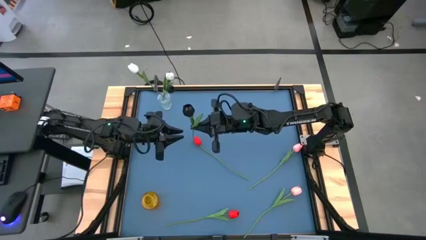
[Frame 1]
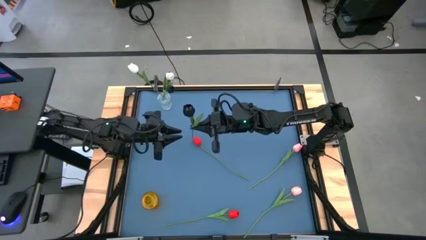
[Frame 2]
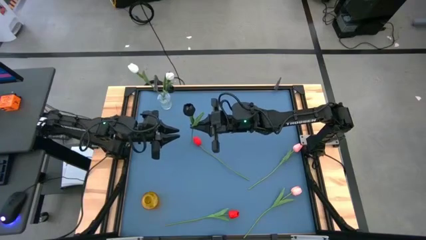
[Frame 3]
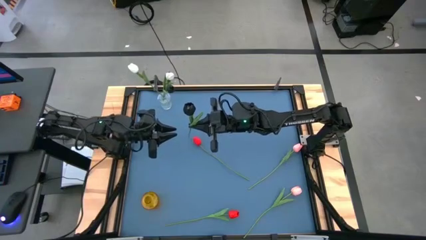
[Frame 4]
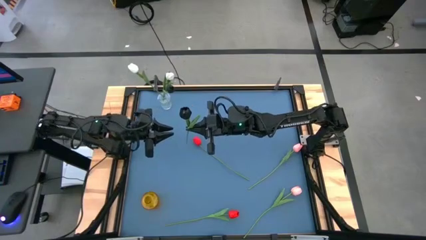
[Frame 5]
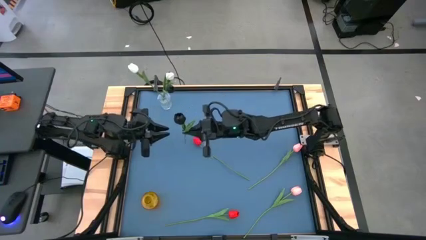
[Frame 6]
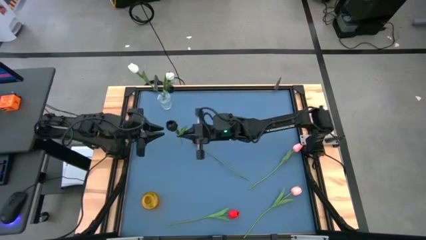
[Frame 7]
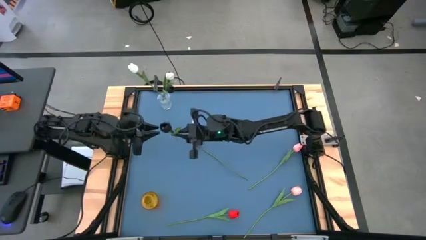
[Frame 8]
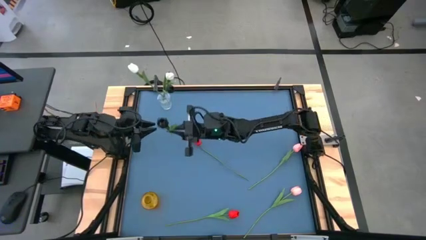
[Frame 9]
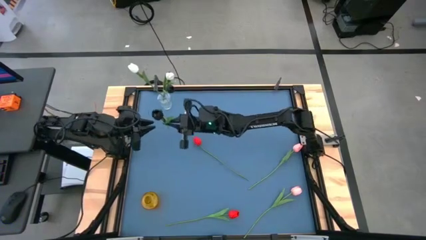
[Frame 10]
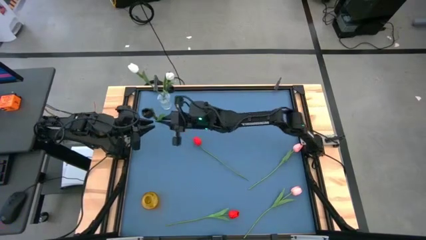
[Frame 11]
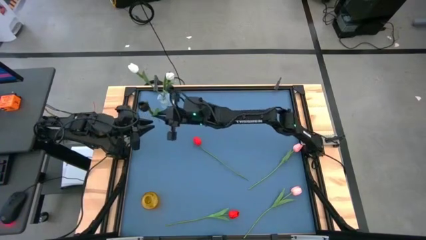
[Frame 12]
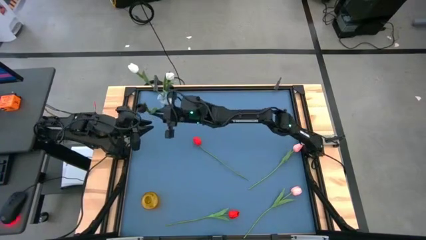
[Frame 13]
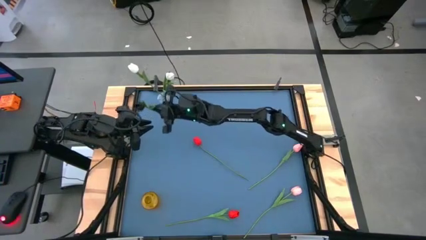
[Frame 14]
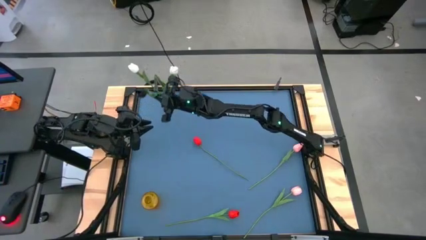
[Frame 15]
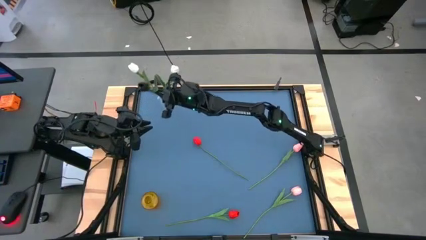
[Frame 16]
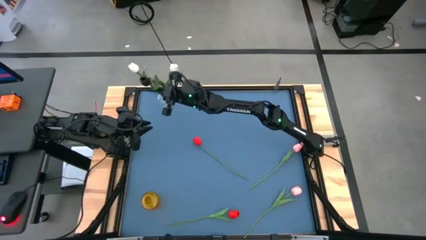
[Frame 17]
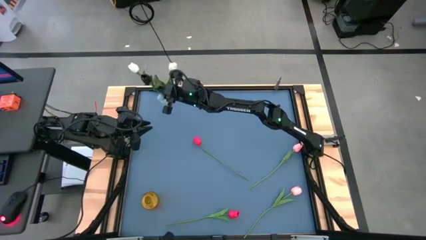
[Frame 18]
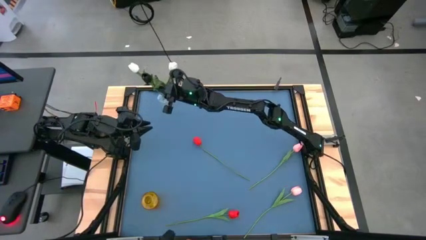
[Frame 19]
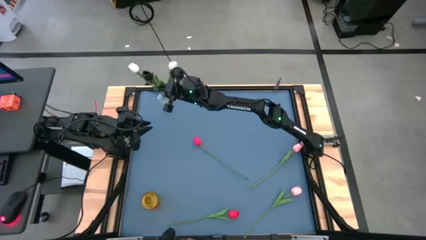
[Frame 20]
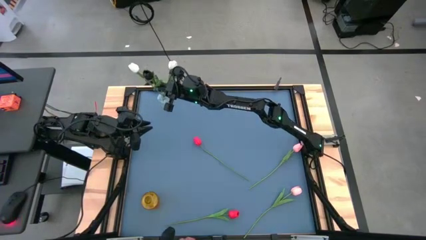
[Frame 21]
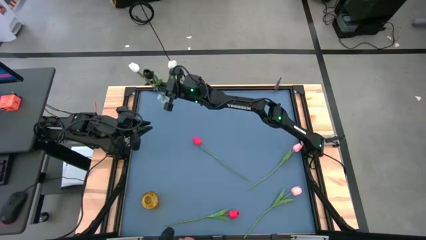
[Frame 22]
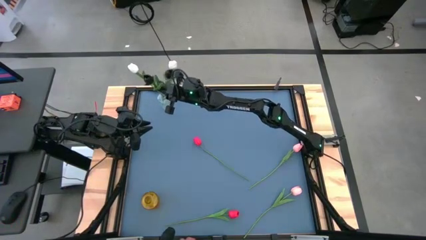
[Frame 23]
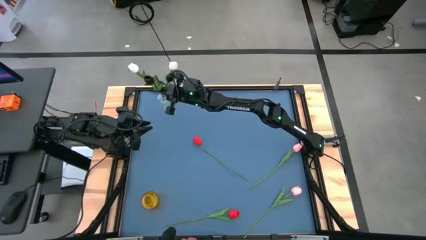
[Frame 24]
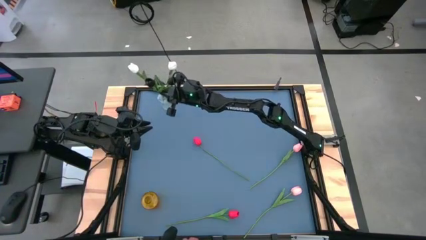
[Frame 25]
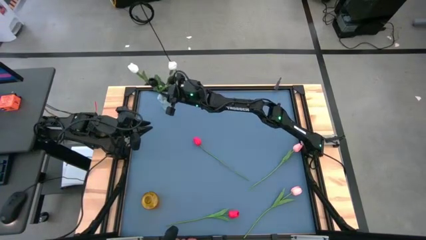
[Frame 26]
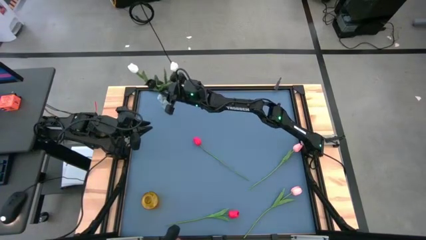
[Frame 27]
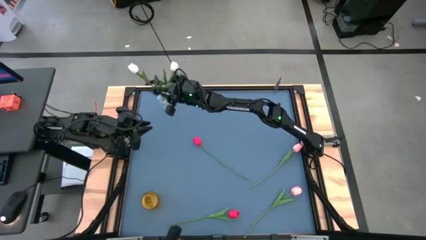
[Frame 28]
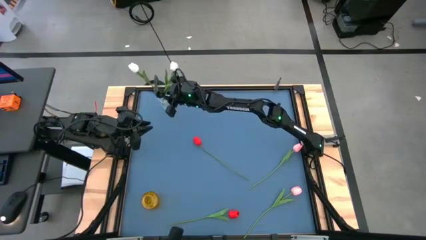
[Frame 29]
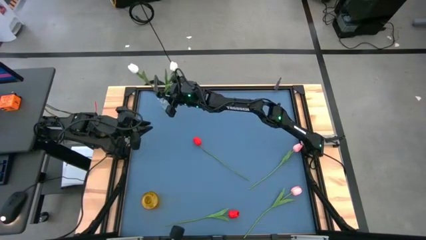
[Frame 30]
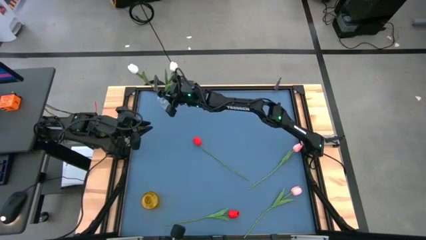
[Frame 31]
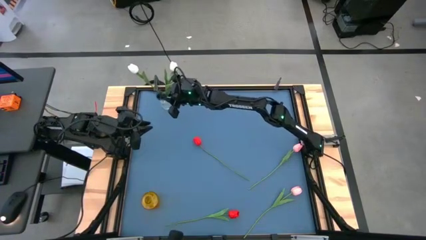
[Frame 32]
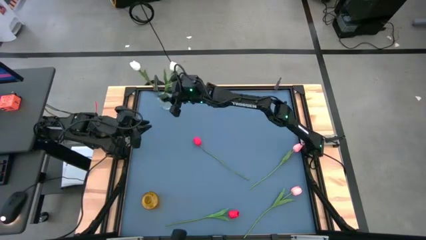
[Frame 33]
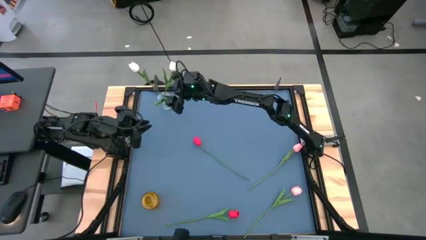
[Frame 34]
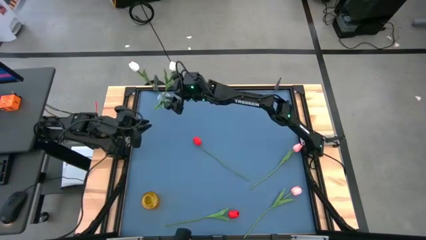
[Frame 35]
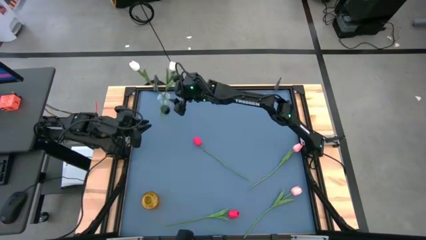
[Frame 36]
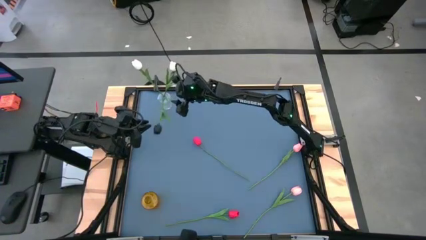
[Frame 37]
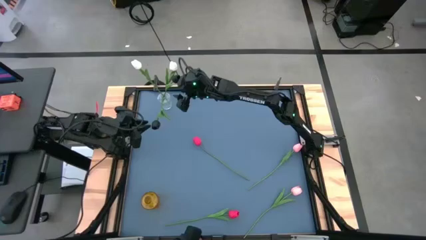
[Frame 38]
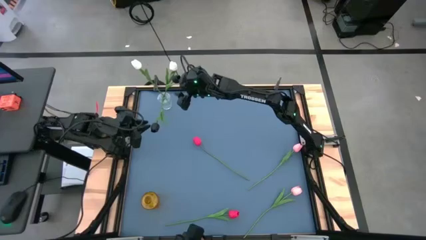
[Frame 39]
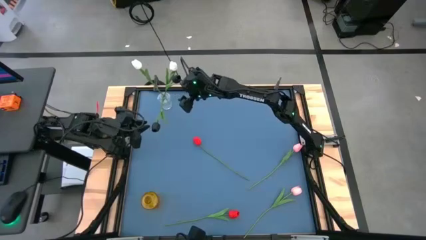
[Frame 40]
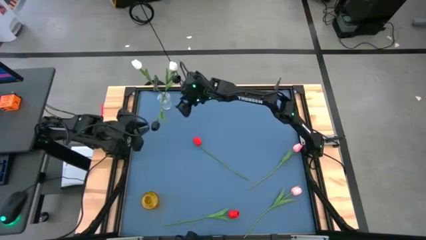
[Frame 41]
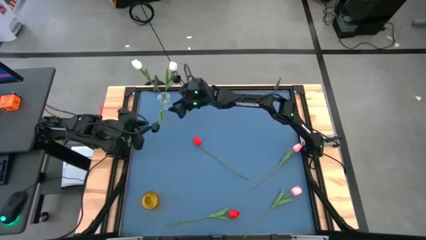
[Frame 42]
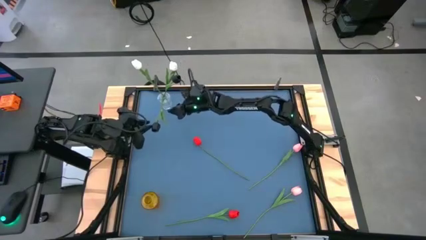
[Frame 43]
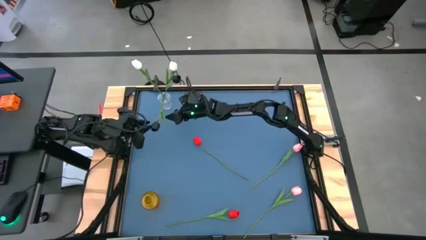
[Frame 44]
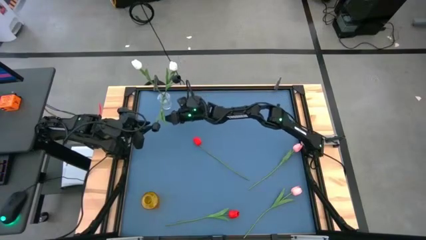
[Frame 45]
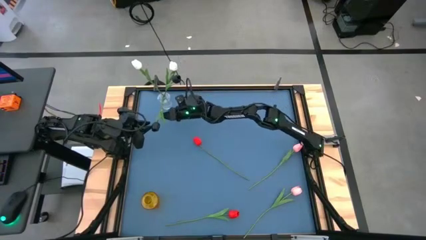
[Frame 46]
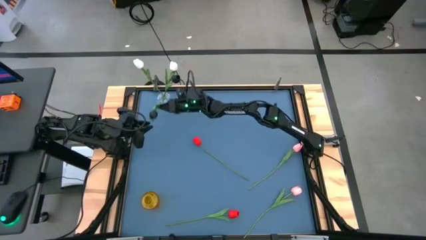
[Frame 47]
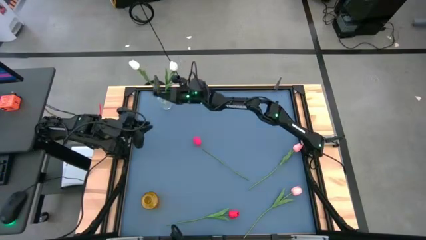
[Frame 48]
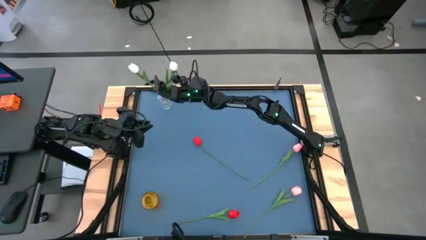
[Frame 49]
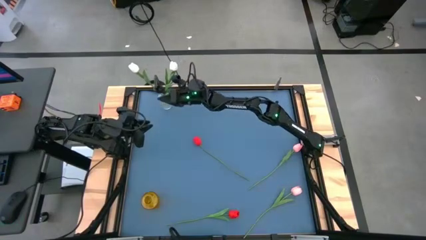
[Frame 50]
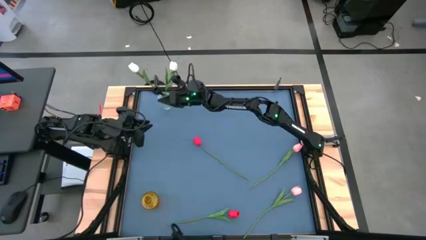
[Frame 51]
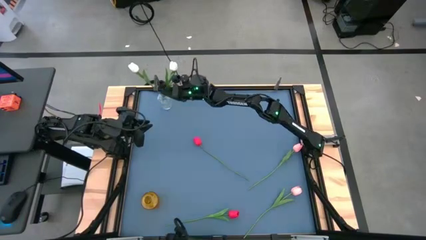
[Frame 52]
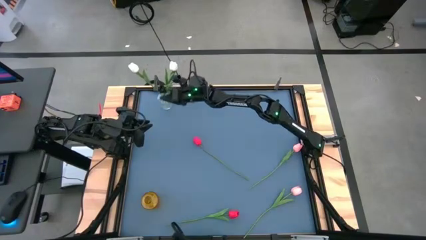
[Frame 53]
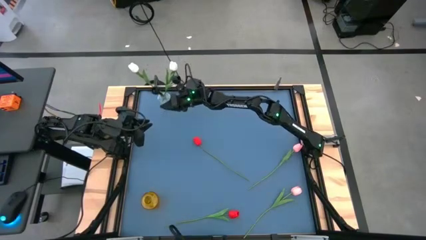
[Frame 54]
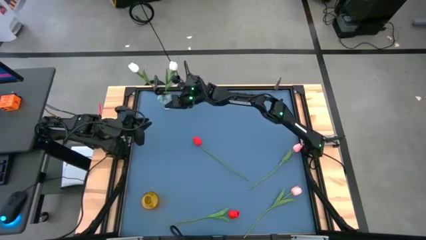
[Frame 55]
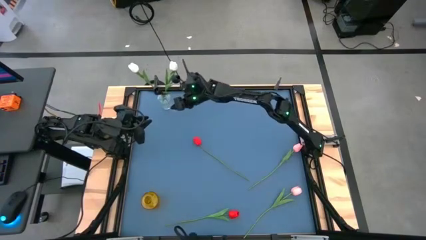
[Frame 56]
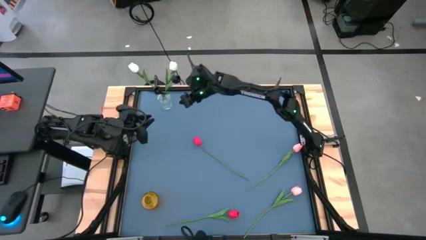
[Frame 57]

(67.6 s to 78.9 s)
Task: Sort flowers into vase by color
Put the black tulip into the transparent flower vase

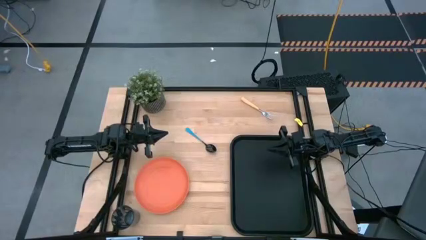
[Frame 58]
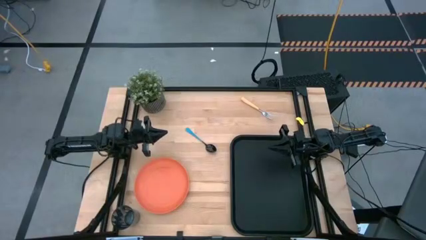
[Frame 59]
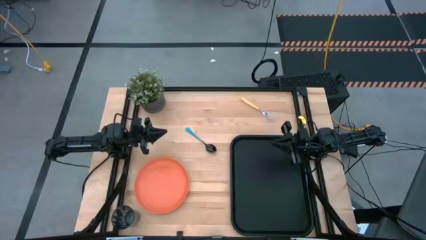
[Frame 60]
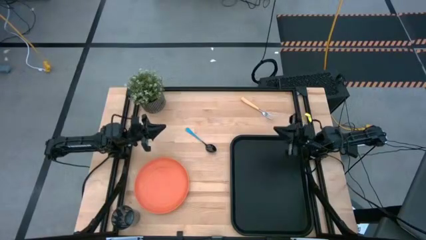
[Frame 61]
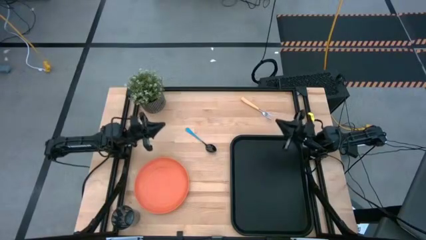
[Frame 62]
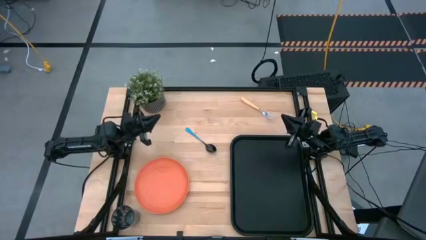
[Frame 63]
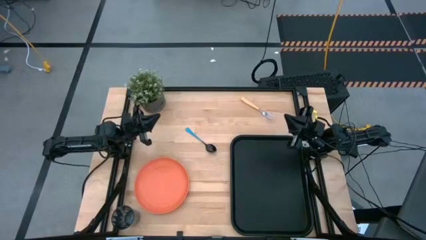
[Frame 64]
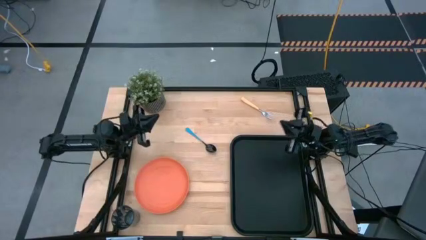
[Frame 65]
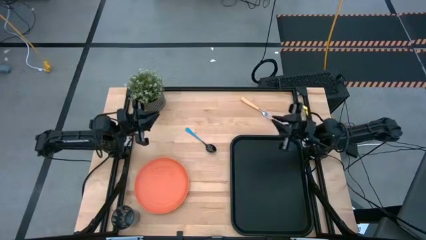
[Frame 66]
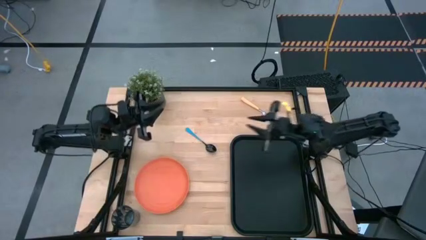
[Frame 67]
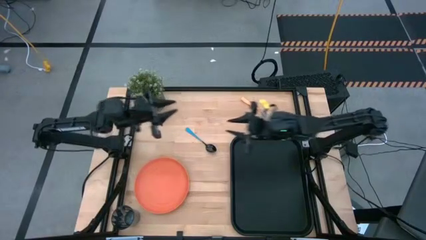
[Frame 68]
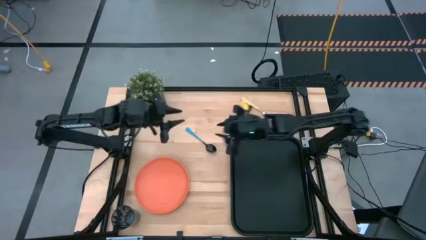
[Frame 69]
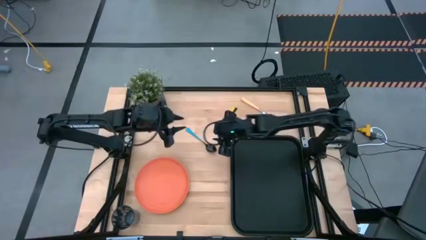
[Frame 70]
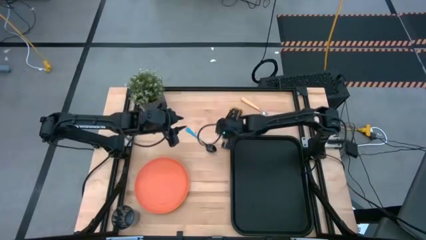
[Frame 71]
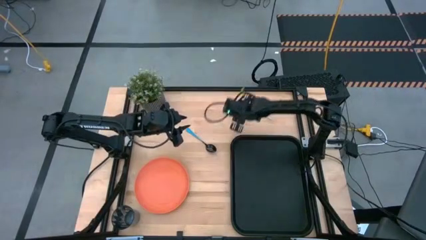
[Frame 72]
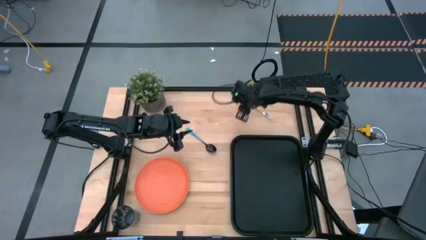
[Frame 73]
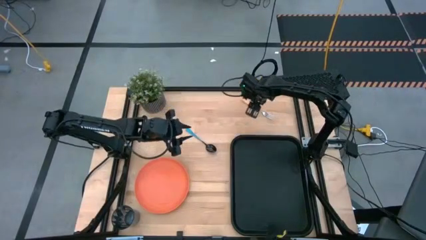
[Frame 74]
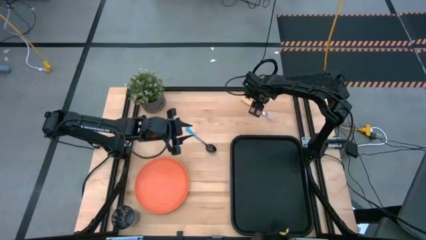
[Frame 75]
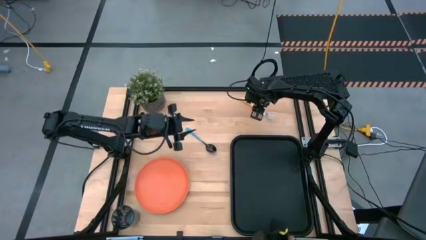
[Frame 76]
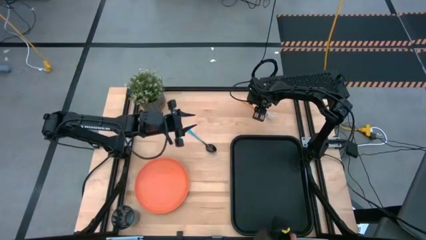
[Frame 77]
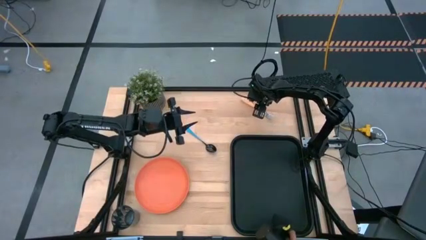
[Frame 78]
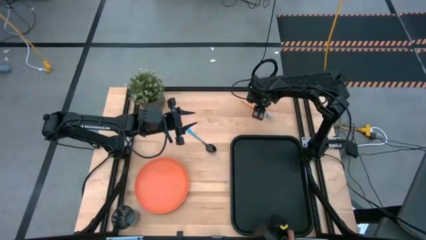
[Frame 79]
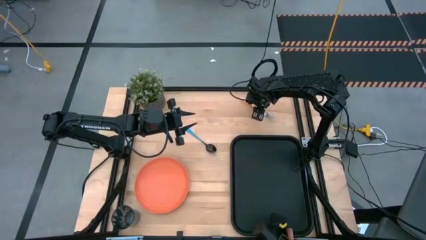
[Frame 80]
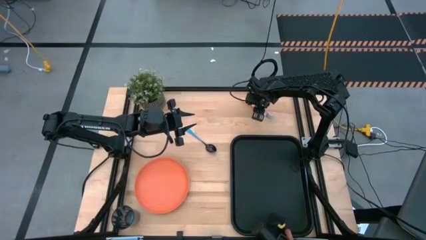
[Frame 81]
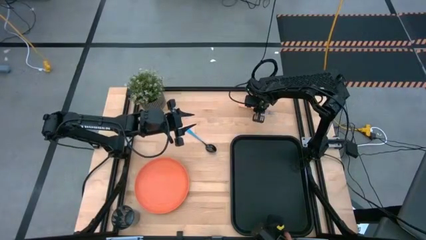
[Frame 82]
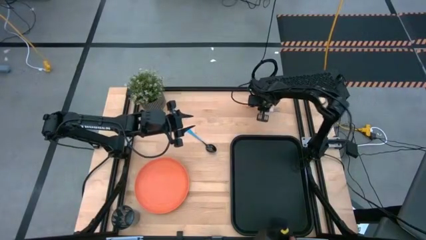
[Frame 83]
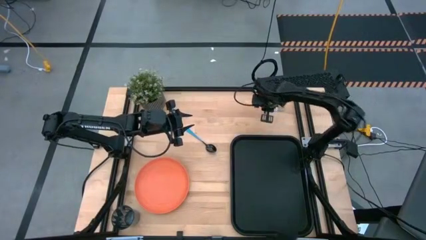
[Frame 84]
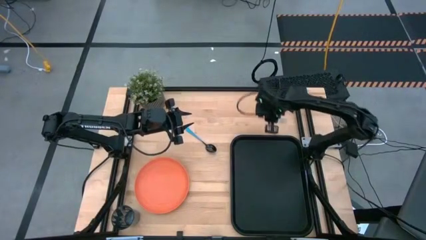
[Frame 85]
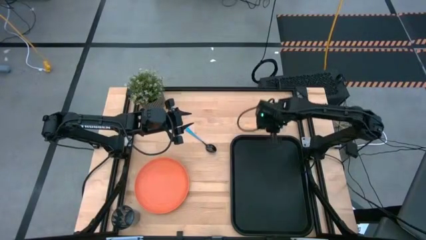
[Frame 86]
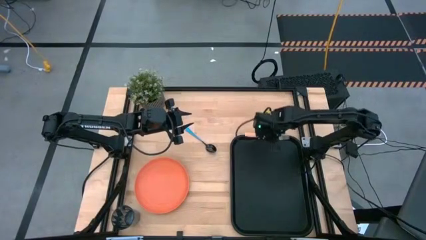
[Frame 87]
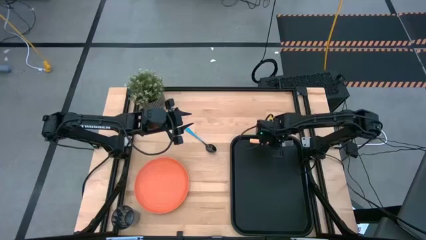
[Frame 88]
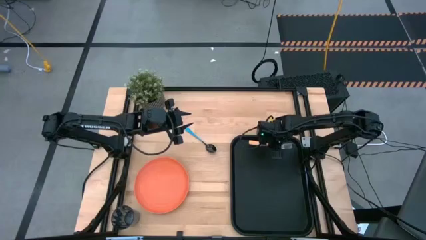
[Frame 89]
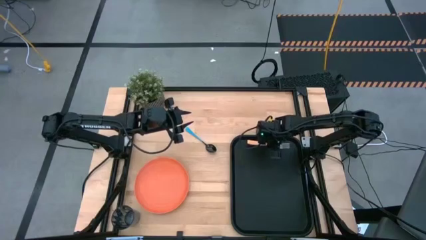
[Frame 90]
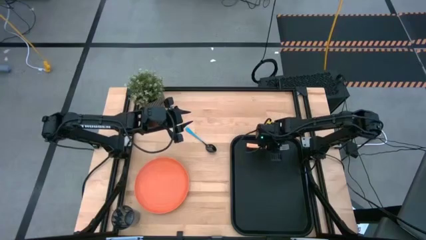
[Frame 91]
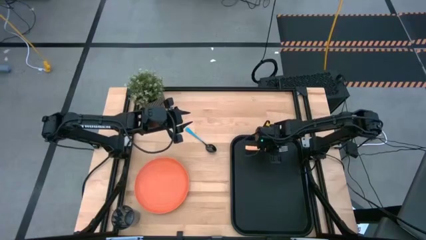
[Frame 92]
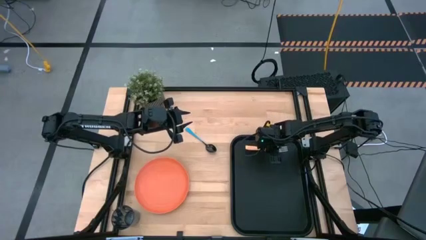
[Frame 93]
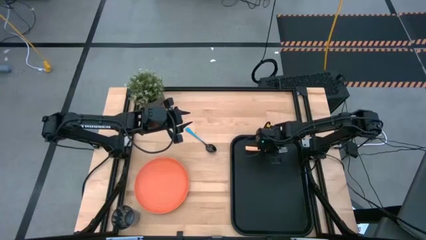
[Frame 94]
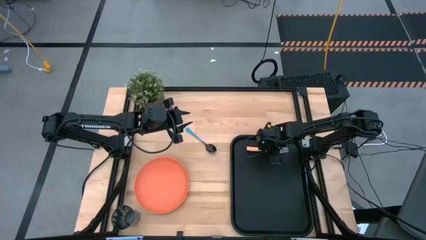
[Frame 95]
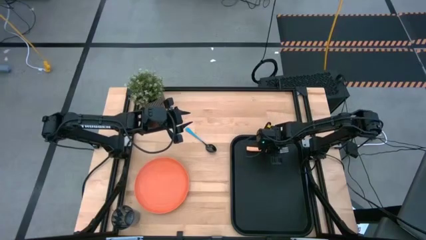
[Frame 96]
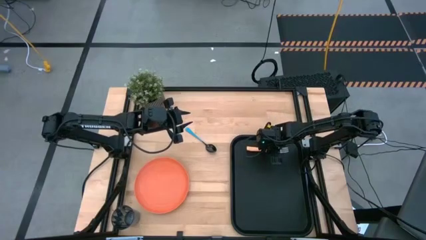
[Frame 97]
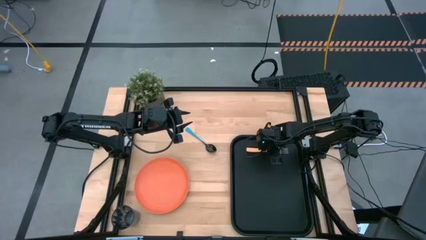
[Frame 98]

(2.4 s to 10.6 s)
Task: Pick and place plate/cup/fork/spoon on tray
Put the orange fork on the black table tray
